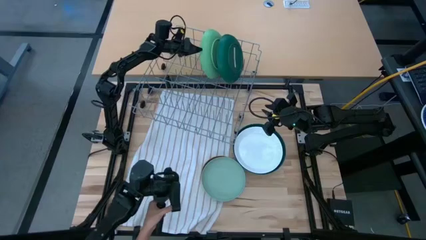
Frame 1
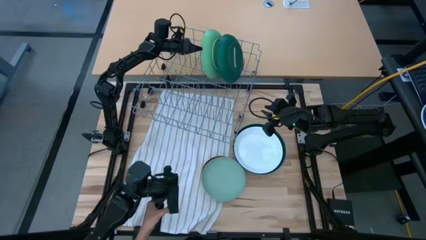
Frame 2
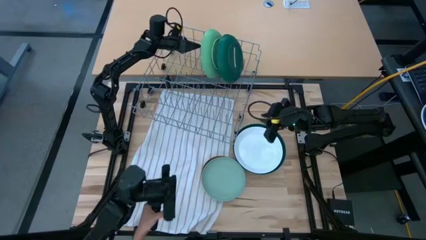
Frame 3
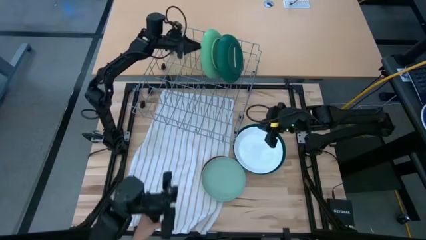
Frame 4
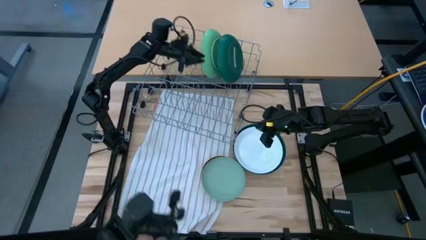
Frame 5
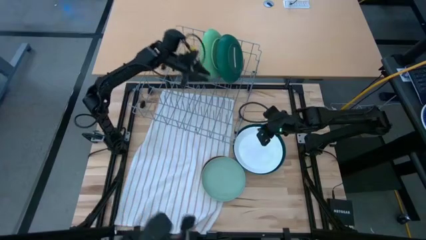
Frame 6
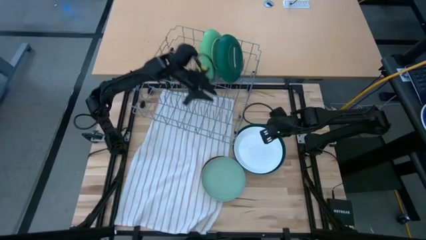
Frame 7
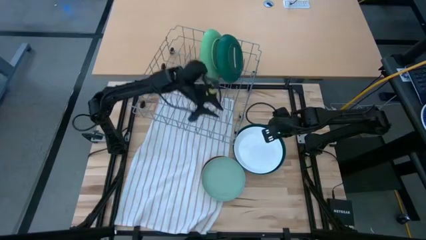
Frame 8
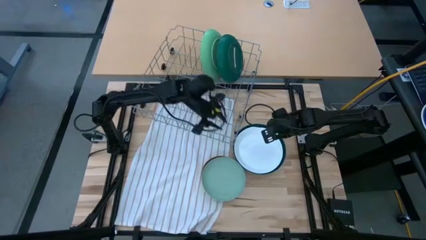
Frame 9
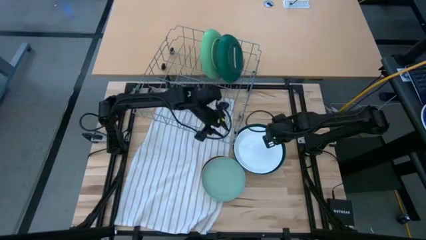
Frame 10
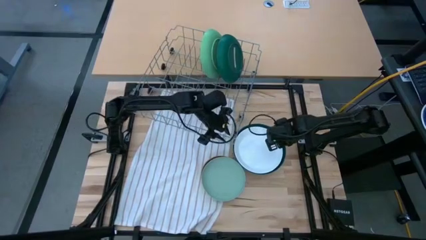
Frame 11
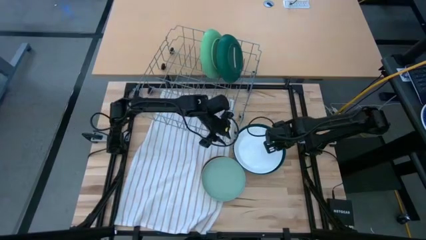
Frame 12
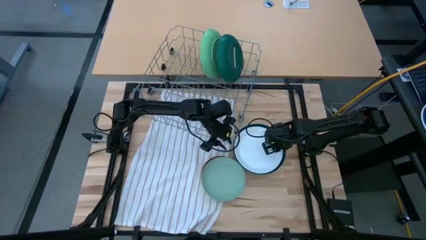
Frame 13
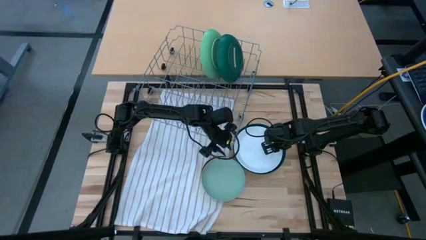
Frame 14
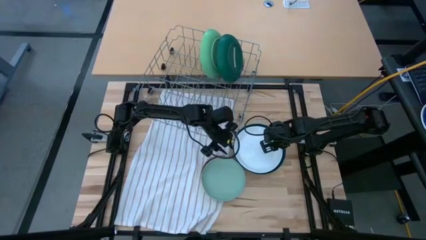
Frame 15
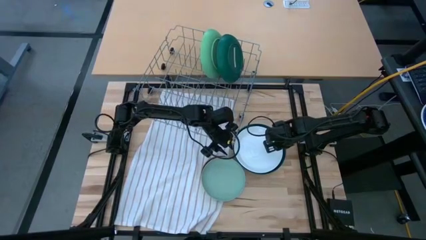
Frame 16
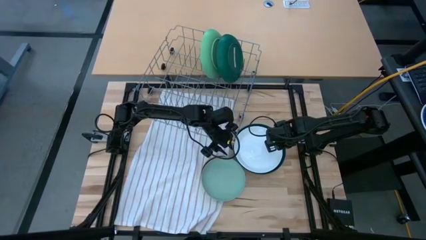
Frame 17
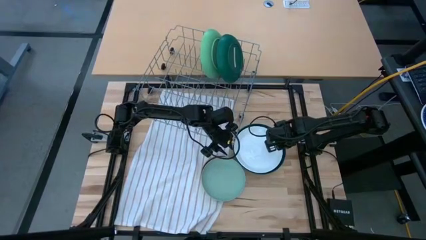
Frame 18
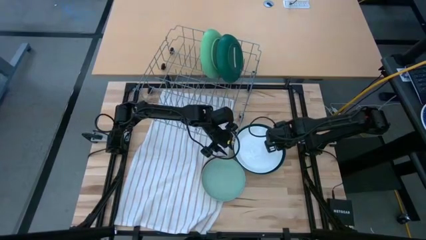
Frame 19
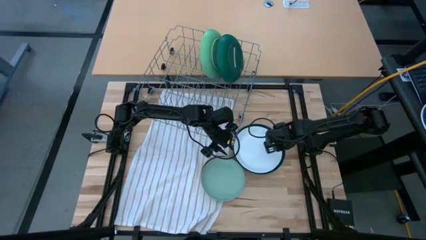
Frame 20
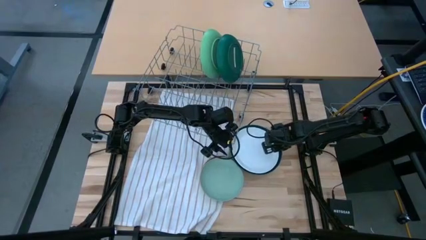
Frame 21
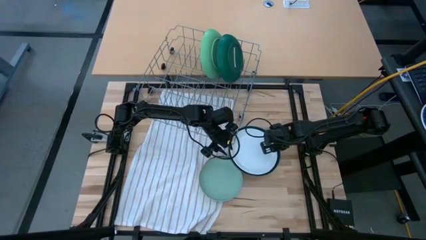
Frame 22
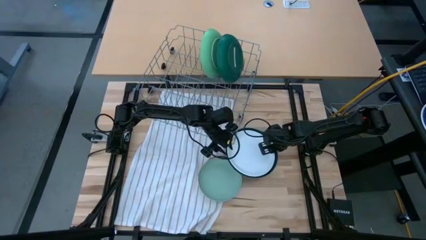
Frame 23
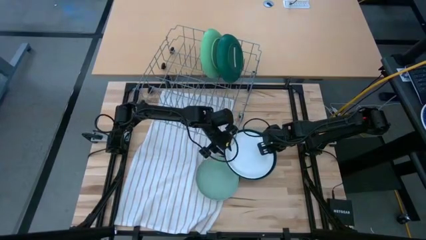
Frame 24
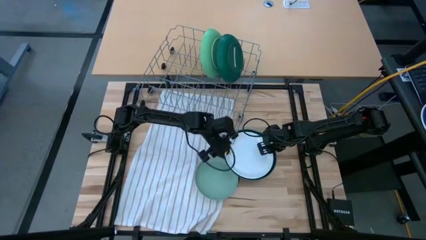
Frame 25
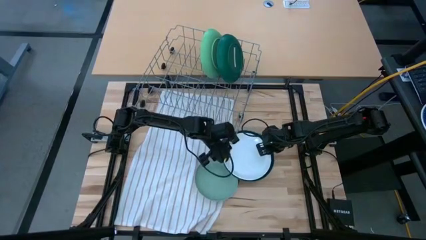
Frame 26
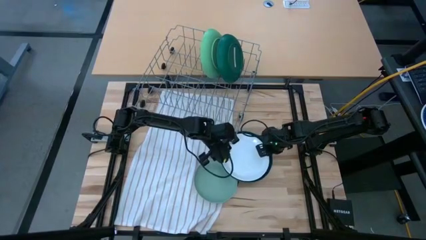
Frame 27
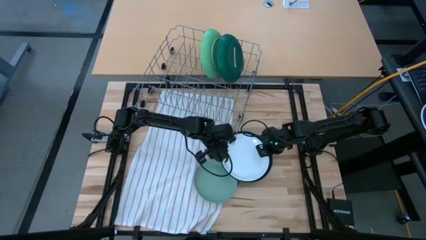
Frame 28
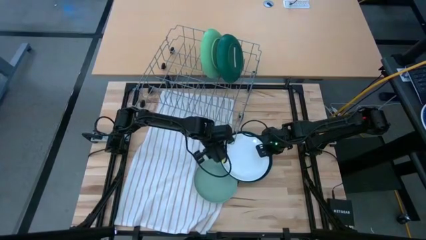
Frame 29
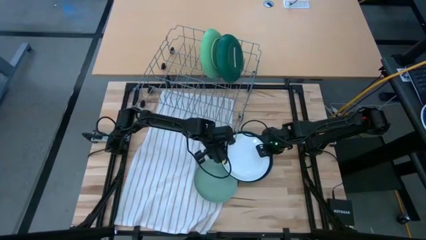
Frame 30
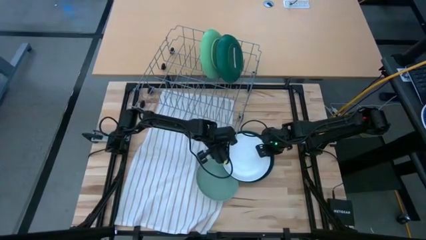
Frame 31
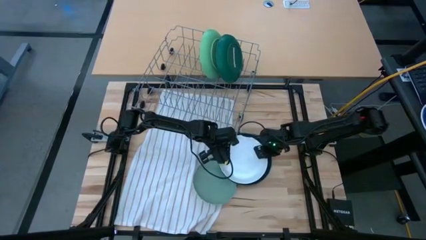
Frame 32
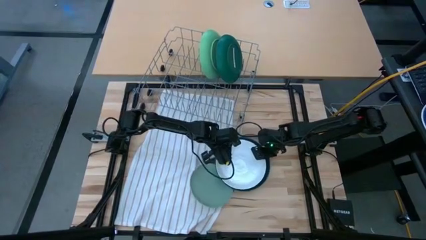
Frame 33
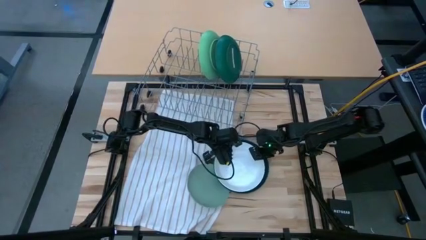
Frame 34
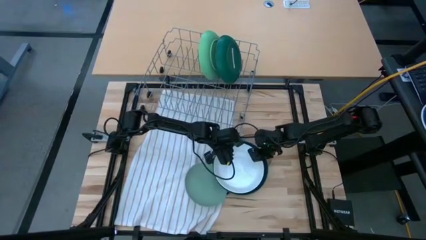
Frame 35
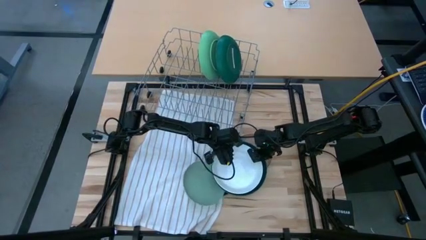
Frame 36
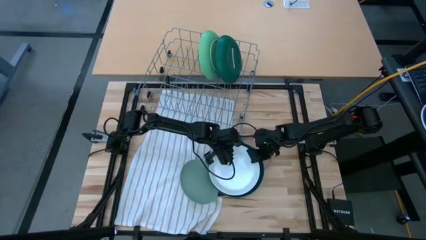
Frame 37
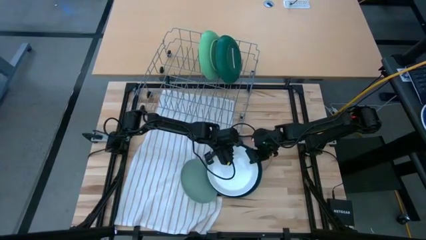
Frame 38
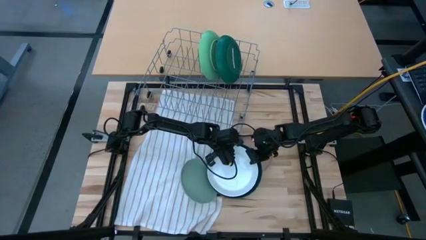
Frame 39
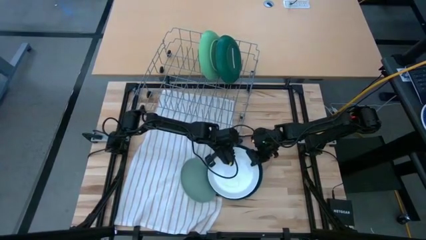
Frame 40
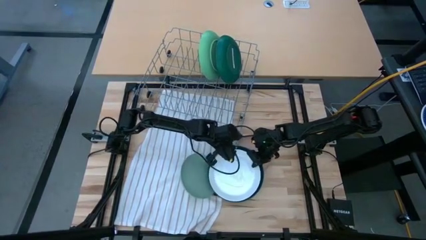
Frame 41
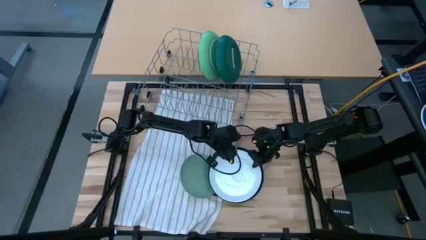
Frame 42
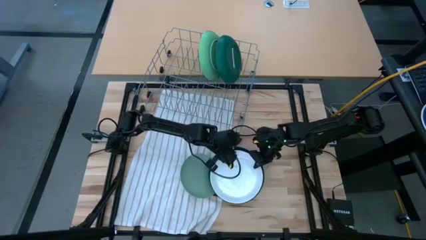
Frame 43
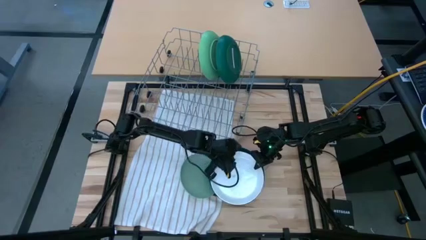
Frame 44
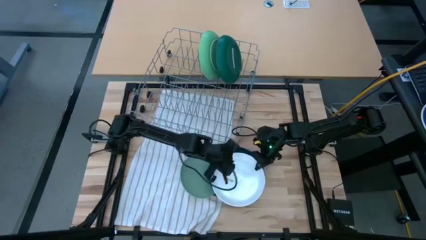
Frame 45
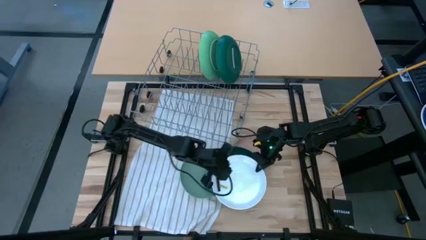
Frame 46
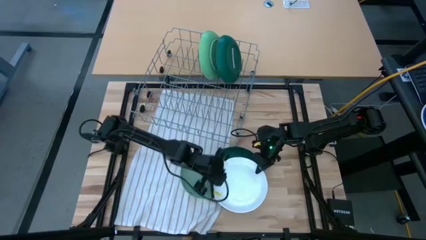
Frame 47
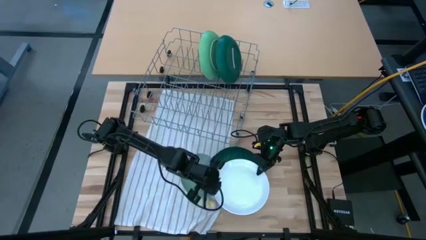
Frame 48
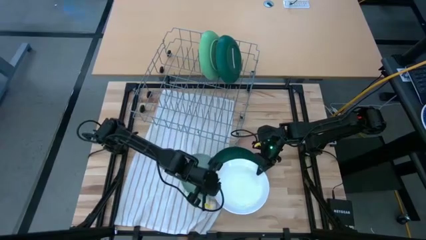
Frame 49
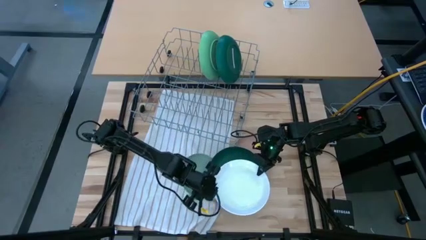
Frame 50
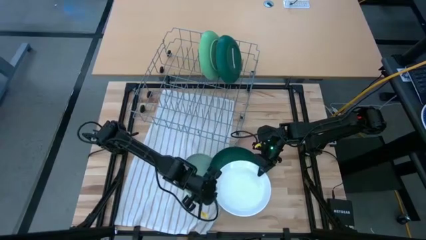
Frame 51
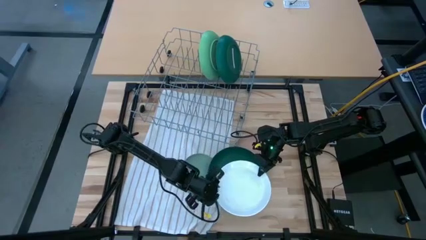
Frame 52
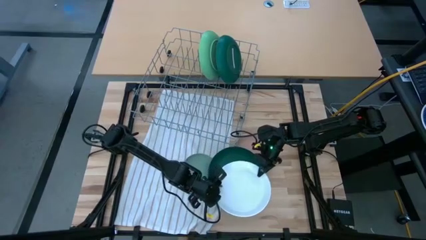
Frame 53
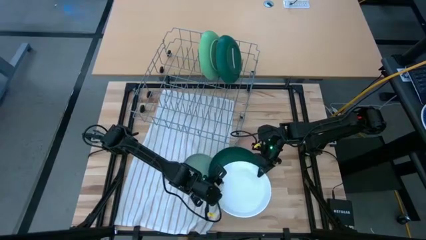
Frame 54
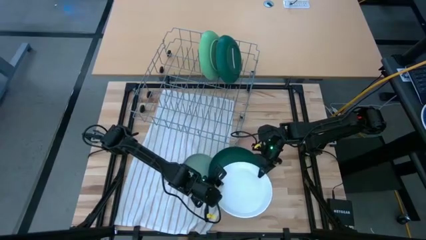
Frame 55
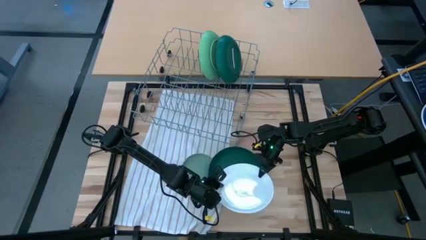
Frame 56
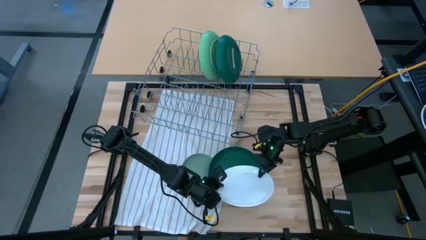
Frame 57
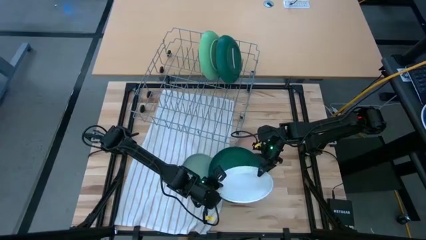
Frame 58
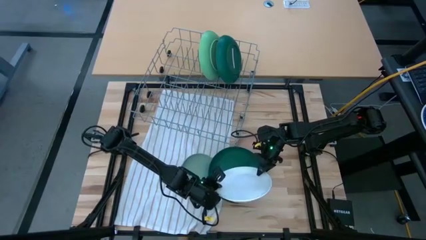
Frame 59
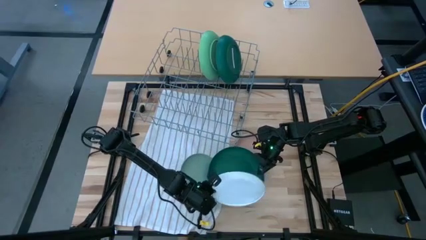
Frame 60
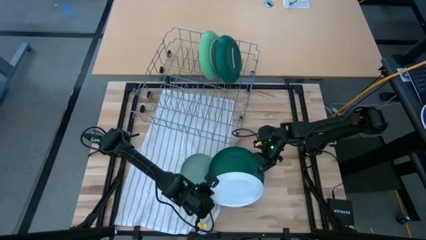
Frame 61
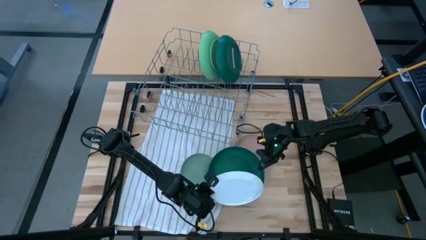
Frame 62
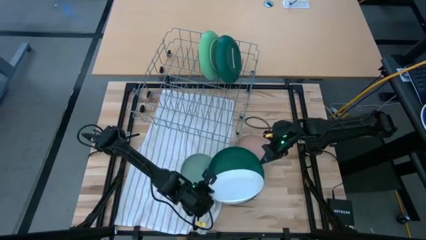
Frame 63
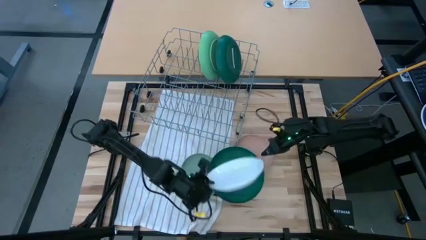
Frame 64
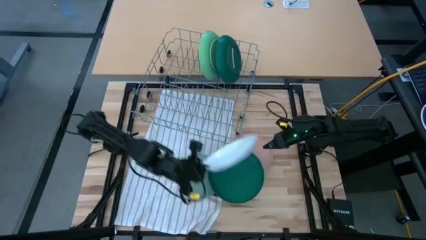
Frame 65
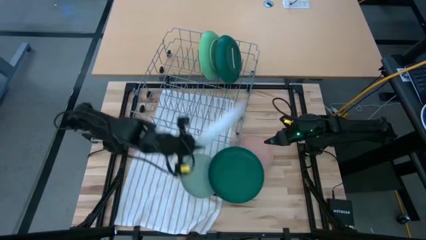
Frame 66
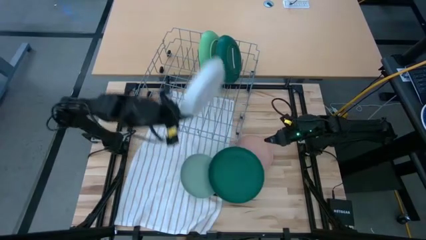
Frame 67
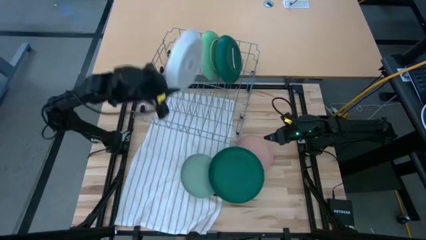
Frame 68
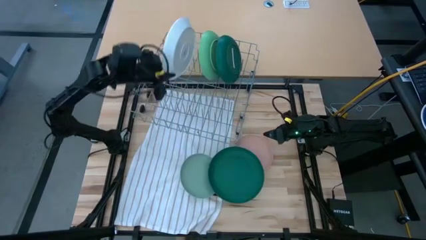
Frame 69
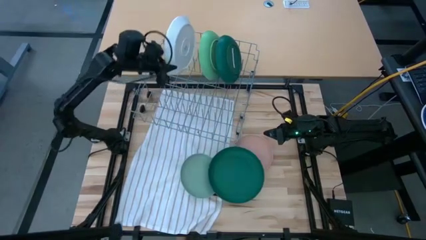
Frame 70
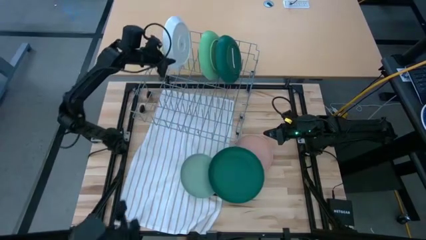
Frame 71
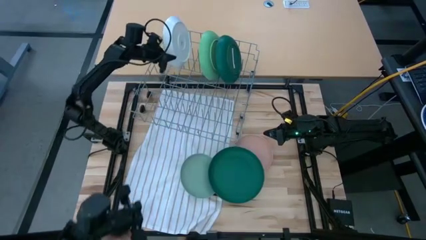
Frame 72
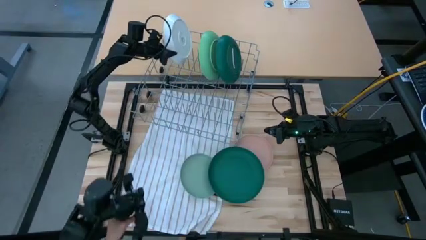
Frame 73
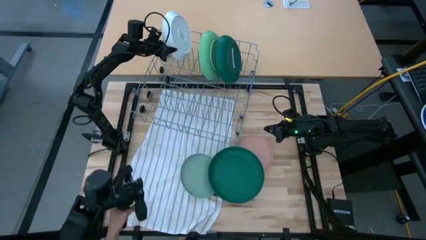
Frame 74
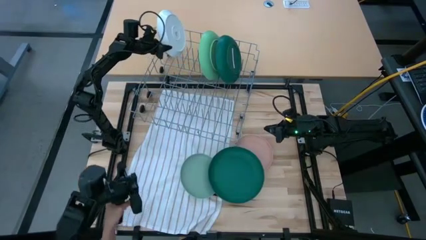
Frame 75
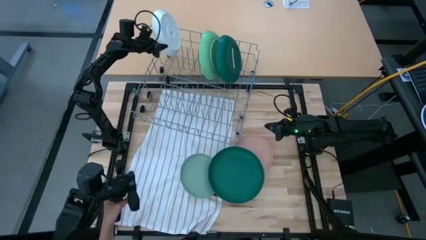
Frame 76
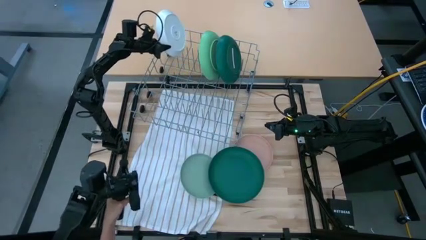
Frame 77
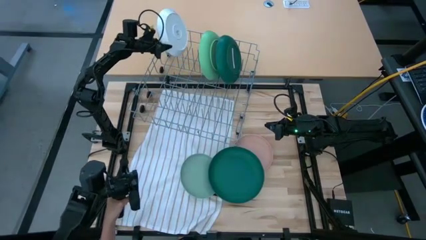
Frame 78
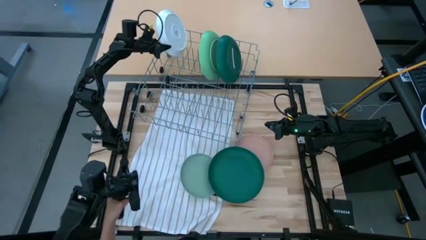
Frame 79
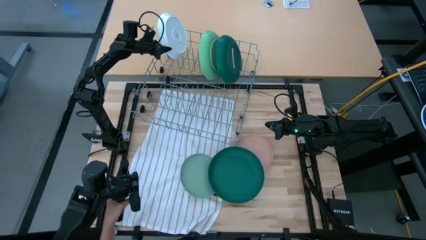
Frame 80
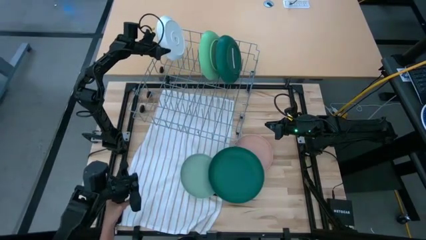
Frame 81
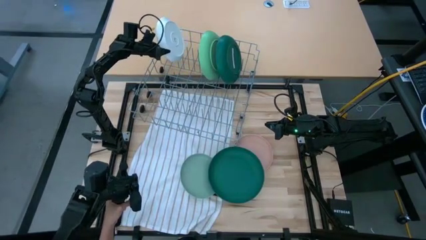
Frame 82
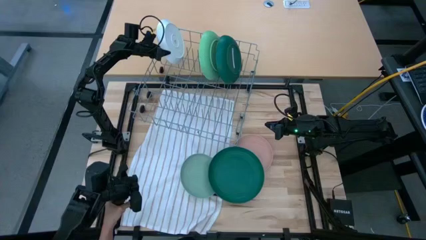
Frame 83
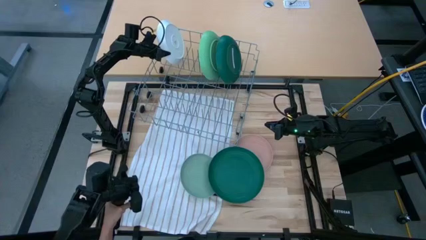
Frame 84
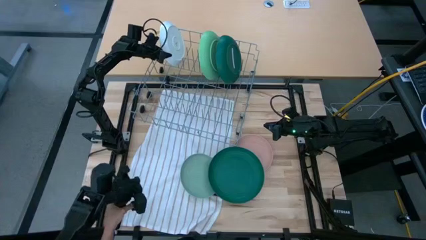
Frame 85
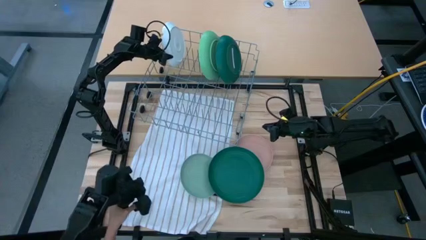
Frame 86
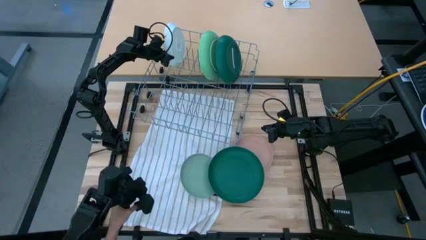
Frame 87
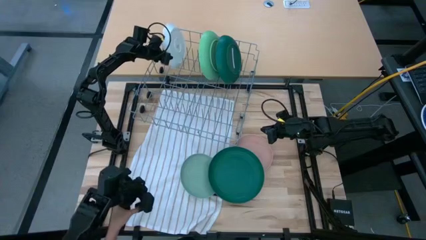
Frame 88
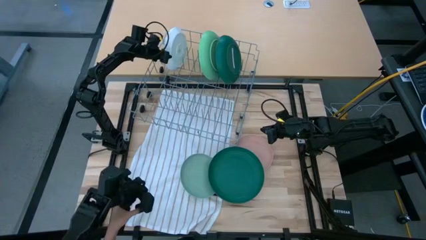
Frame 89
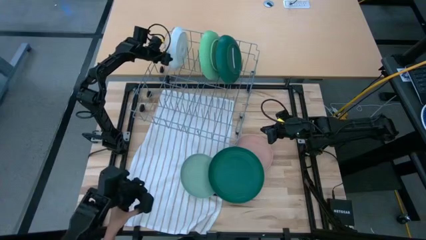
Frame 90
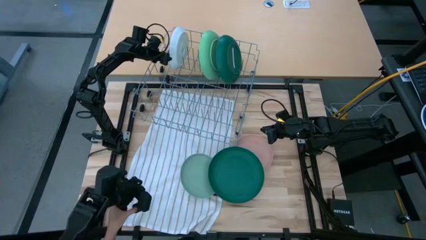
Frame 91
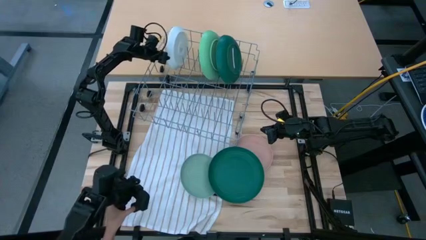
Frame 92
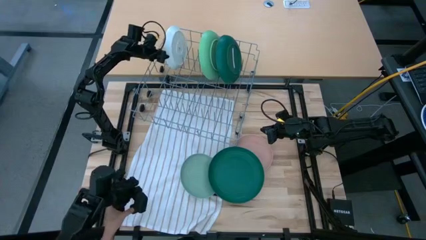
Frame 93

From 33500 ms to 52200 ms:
Task: Sort dishes
Put the white plate into the dishwasher rack
